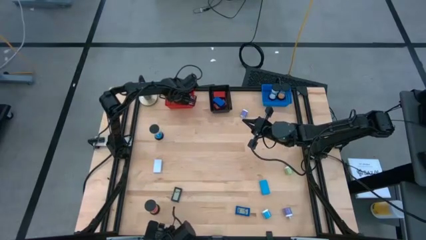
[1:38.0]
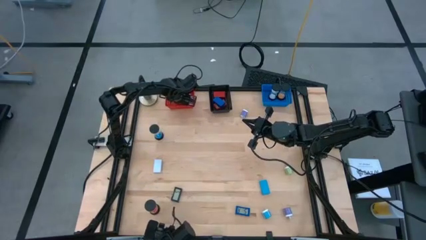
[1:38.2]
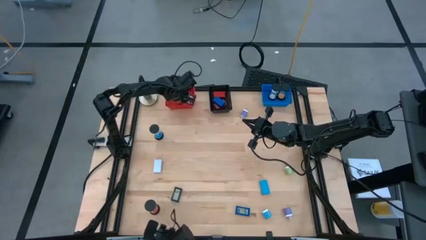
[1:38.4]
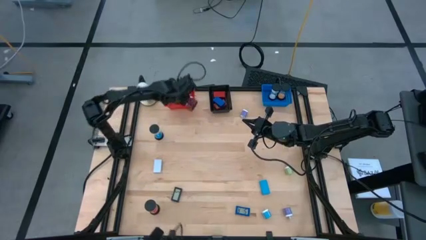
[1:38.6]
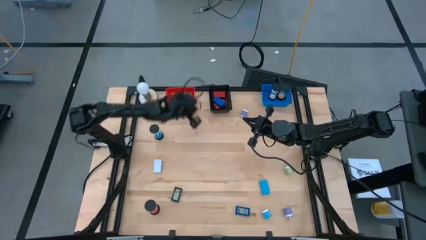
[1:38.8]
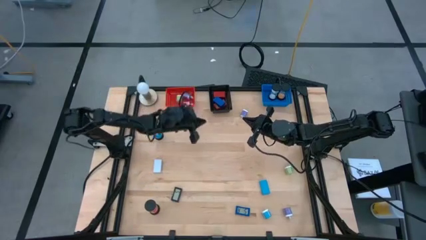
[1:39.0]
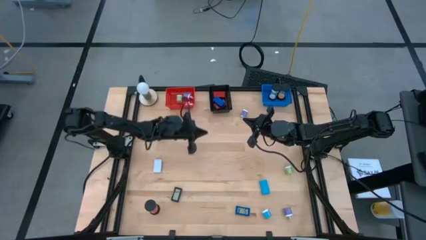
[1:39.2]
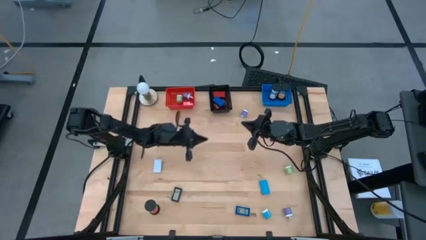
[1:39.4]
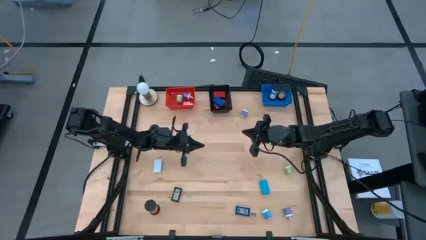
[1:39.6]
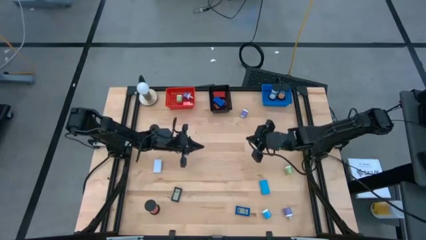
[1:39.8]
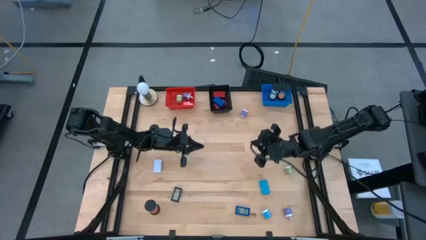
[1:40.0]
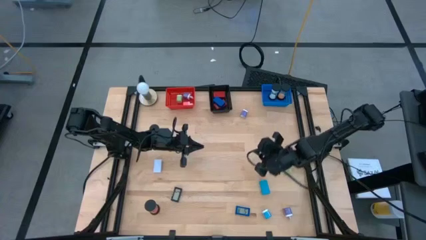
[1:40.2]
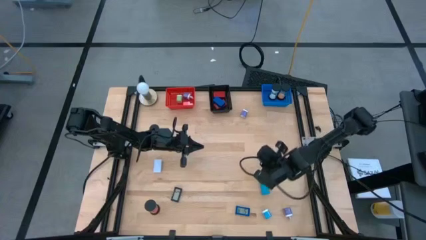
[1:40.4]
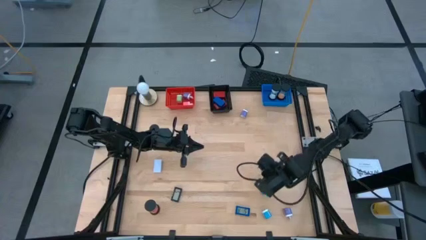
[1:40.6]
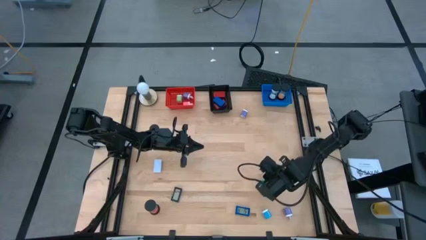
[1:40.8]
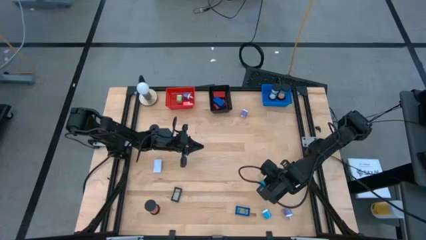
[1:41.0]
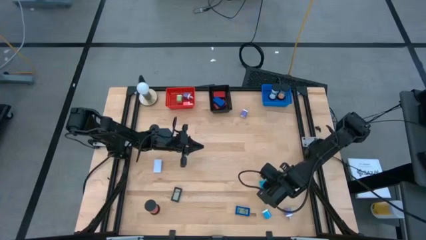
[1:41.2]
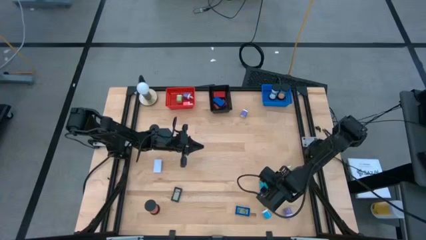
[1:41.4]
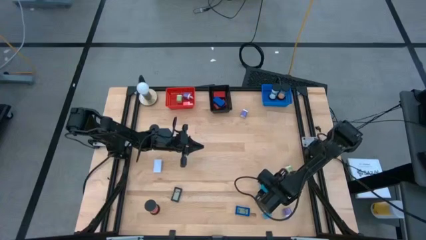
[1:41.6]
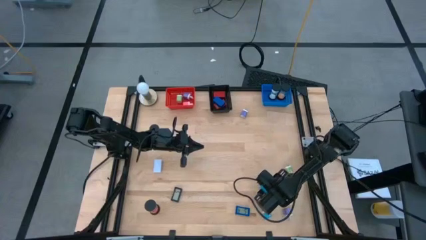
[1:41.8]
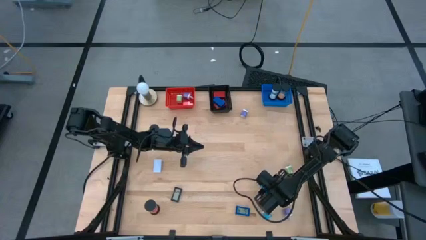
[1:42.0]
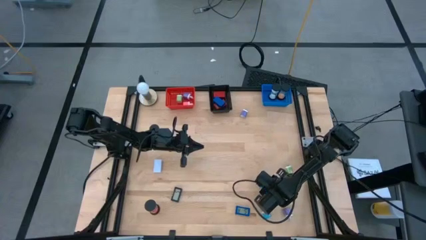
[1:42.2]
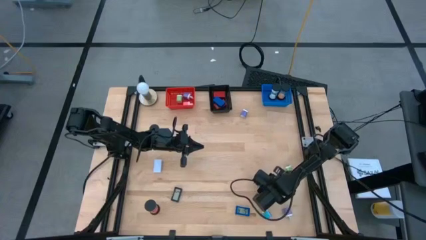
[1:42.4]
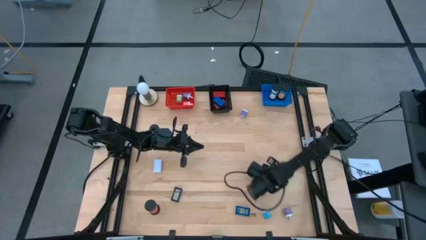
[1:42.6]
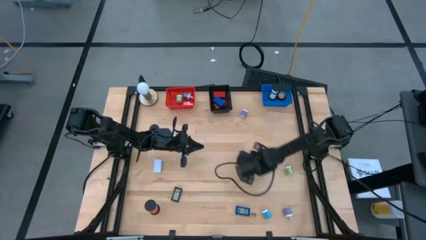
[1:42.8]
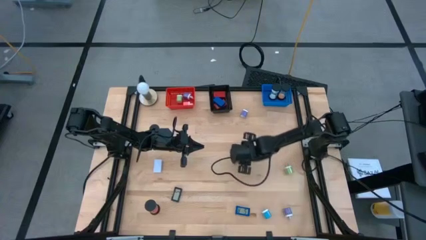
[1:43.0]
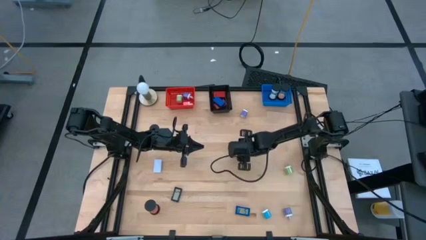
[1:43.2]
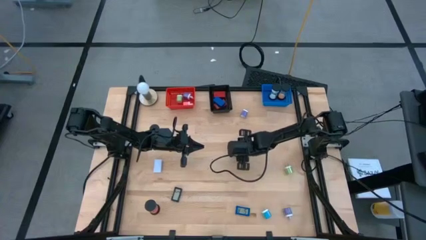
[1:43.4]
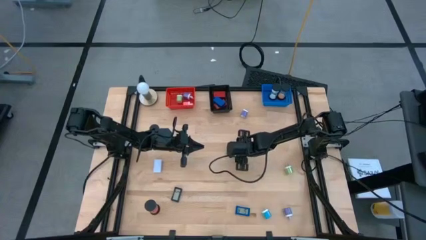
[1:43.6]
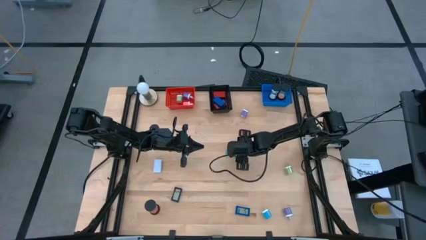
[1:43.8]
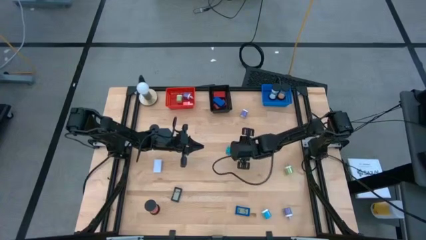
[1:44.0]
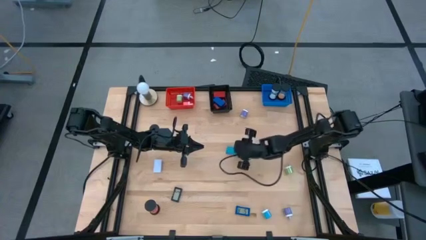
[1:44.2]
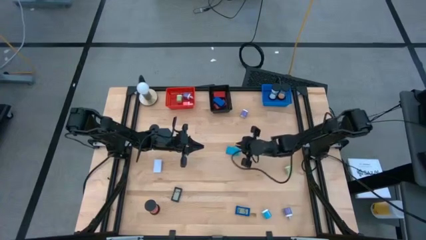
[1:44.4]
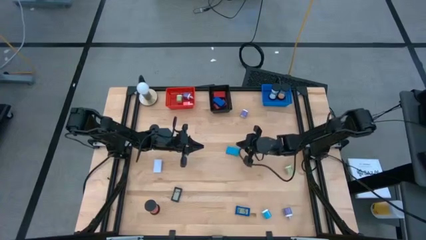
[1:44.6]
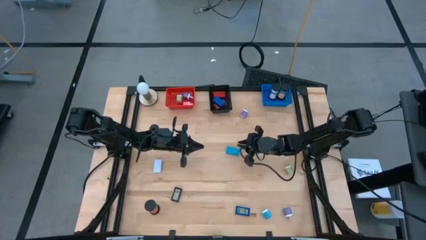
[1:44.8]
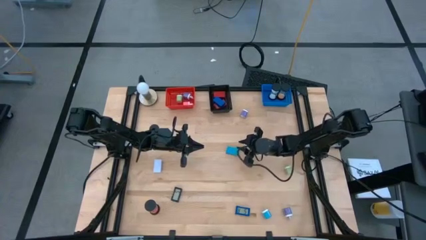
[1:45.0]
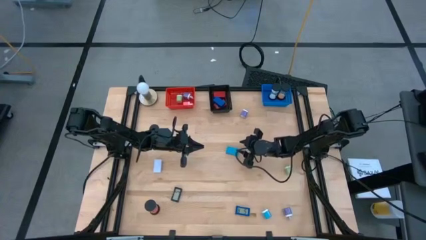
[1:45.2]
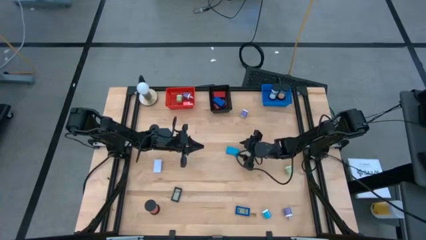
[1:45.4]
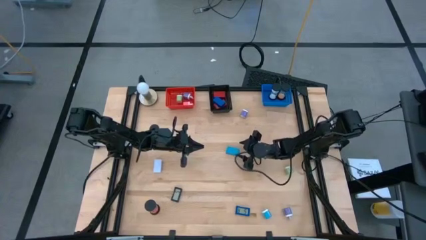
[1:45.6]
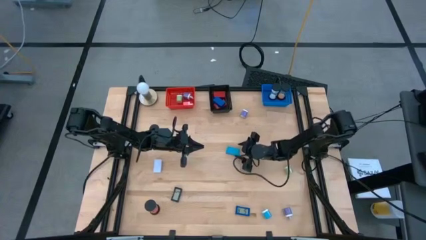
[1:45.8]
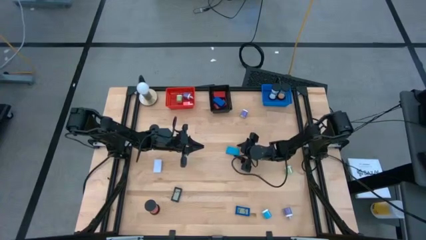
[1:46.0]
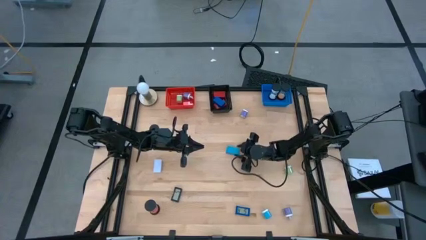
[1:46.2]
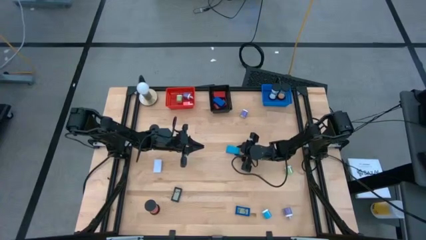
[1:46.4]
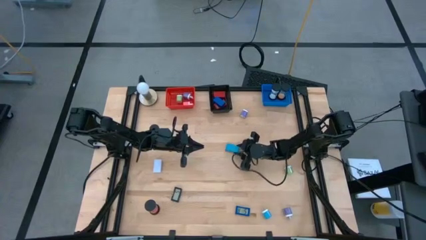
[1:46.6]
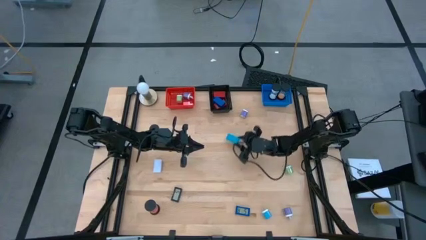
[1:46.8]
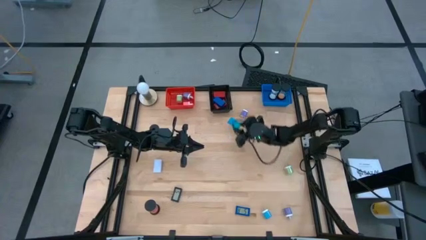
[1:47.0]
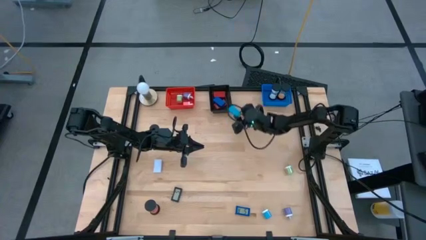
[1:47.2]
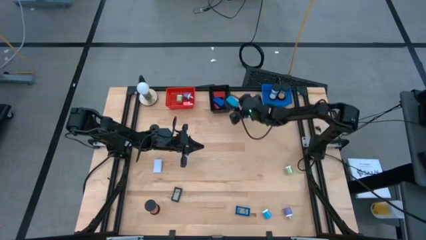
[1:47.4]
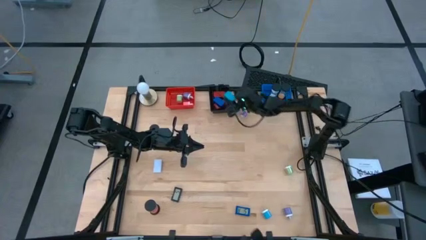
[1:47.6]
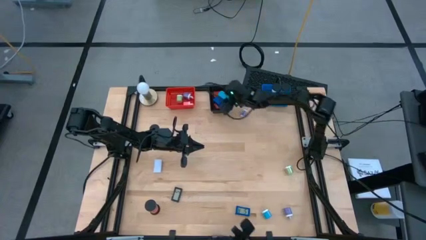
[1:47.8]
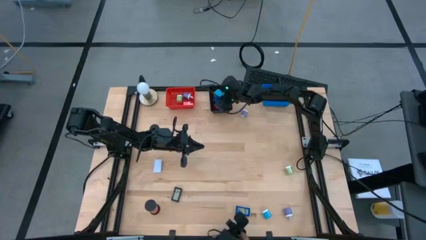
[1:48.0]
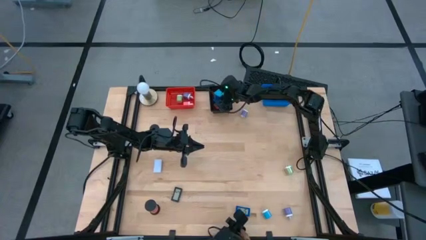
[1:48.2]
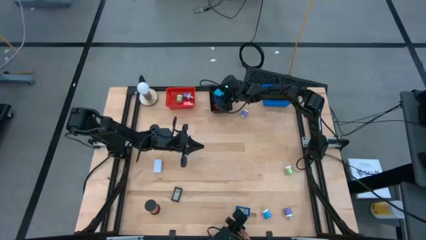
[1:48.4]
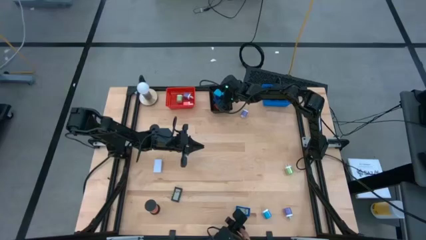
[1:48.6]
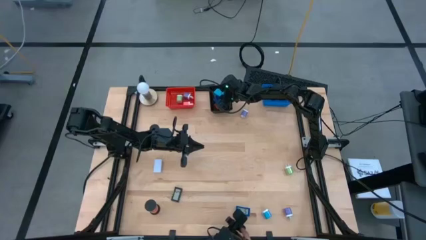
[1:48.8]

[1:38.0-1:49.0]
Task: Pick & Place Office items
Put the light blue digital timer into the black bin

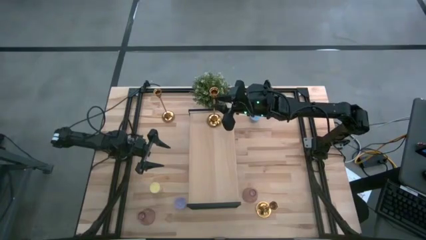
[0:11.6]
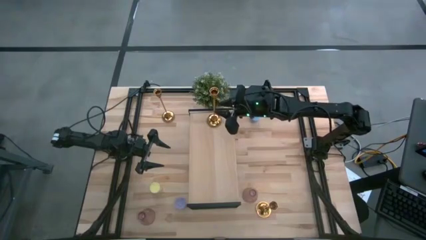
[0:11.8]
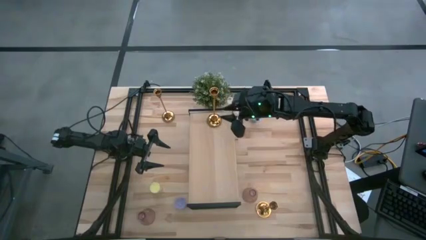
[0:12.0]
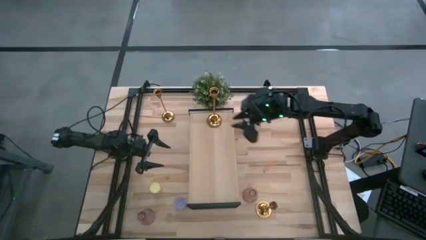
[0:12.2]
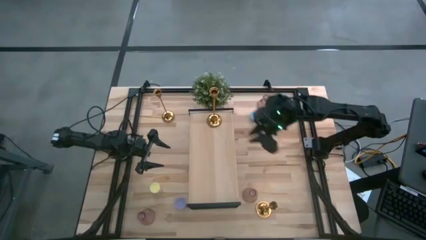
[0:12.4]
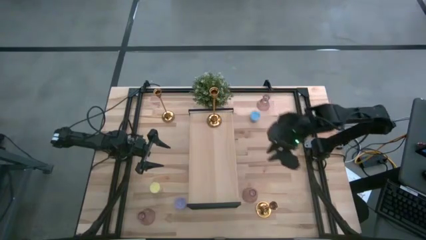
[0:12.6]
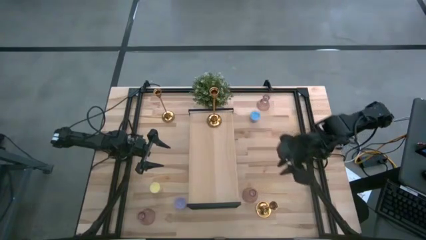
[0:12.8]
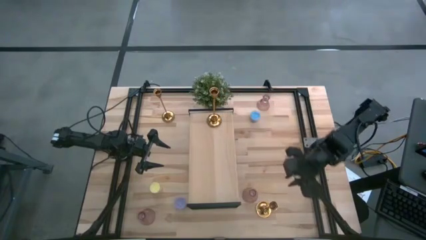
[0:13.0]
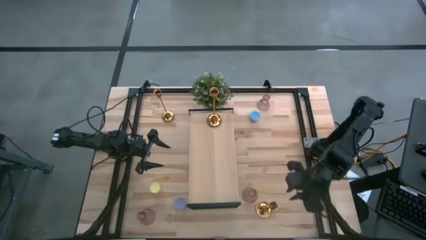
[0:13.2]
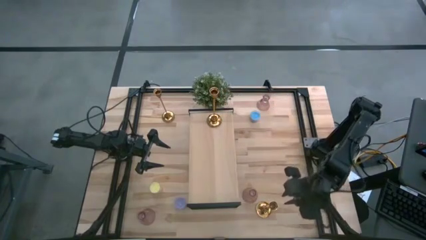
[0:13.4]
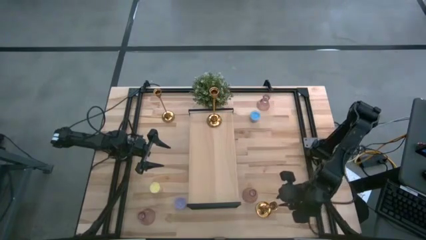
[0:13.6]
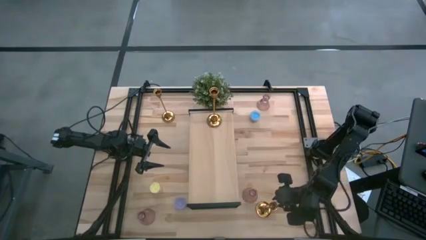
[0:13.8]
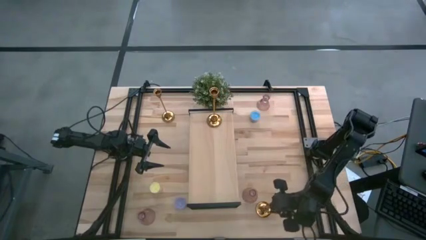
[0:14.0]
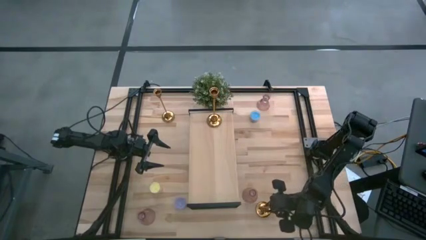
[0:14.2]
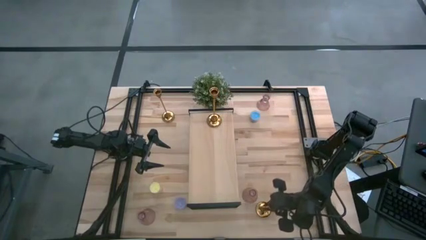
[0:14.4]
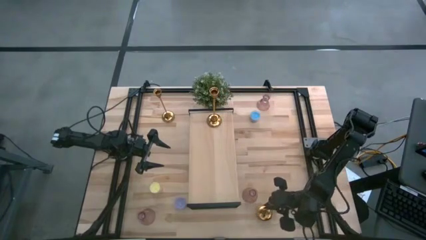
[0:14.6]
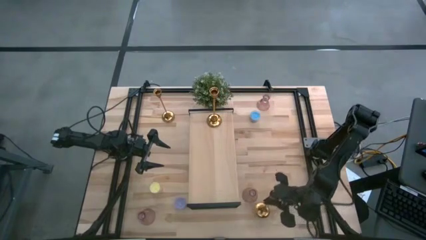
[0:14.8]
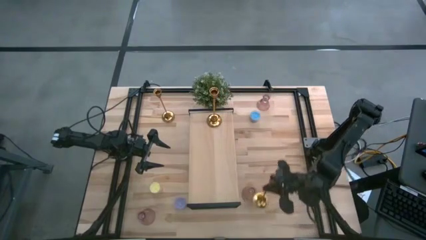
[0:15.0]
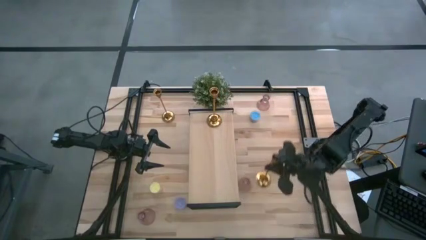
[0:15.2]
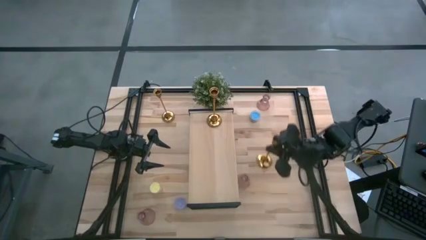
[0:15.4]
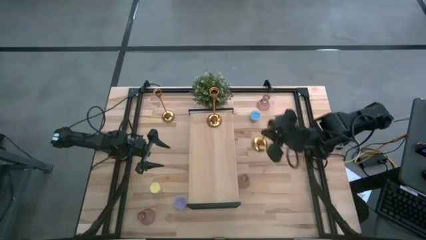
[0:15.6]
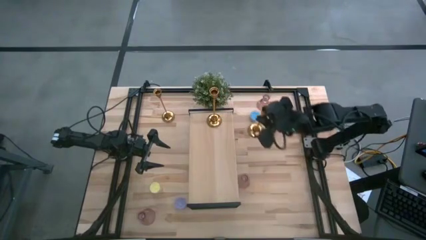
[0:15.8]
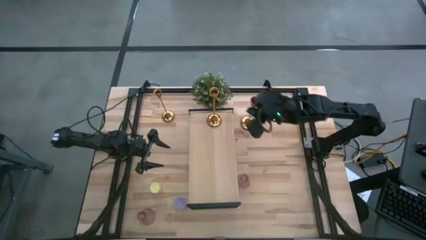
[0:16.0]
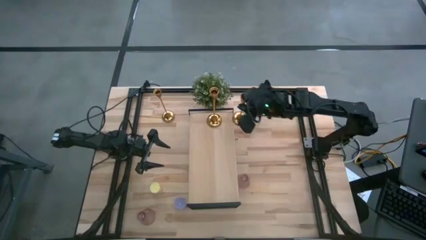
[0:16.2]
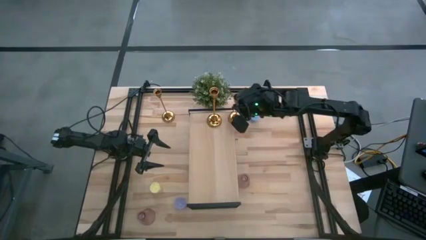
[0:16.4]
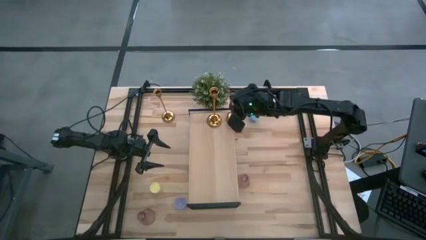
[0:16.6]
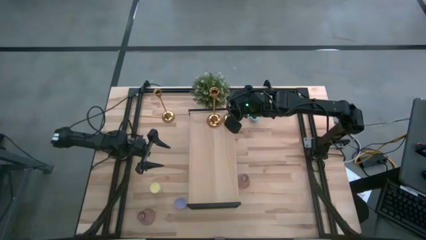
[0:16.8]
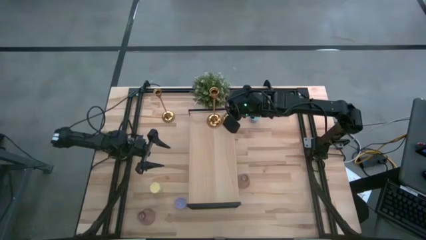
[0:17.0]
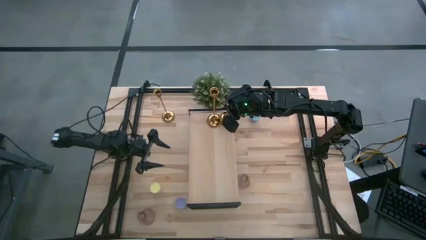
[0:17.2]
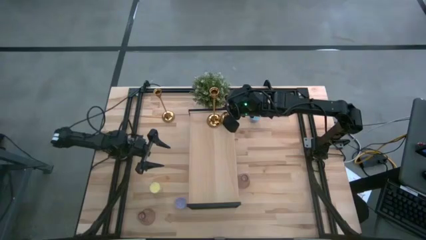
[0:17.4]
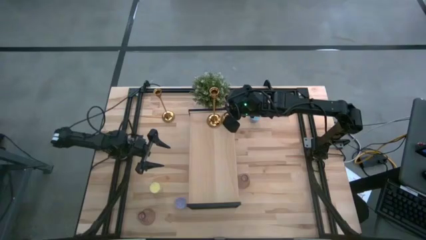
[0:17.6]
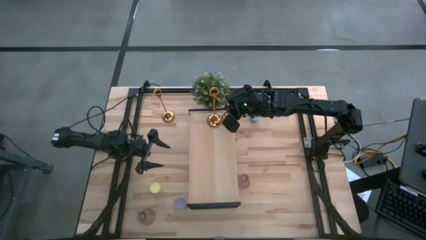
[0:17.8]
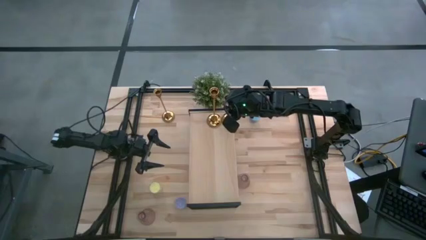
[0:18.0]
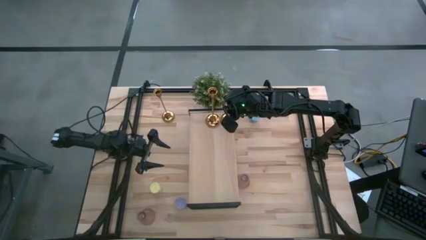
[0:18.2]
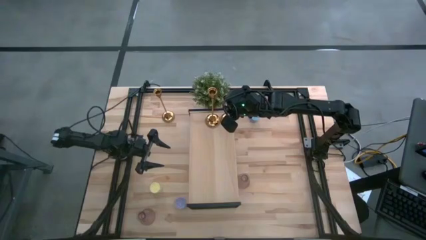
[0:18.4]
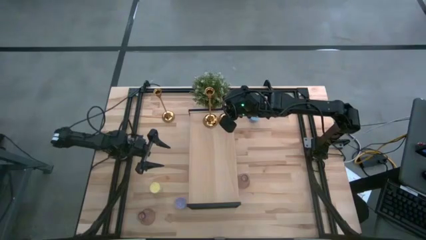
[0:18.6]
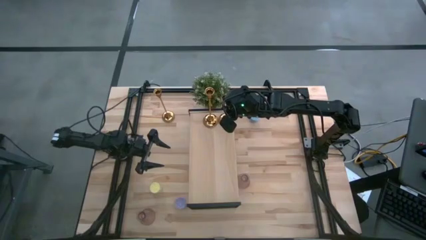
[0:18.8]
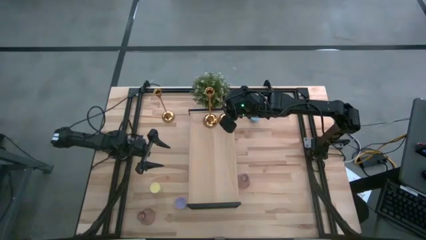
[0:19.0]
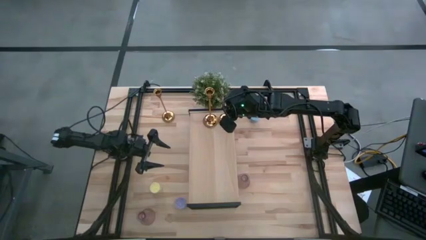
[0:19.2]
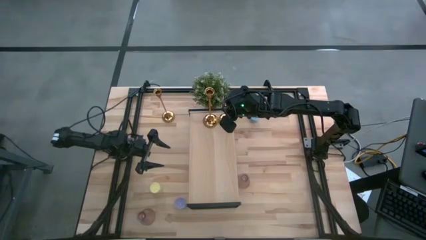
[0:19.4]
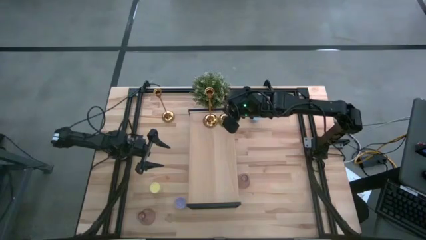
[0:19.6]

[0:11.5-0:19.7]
Task: Pick & Place candle stick holders
Put the bottom gold candle holder on the shelf aligned with the gold candle holder
